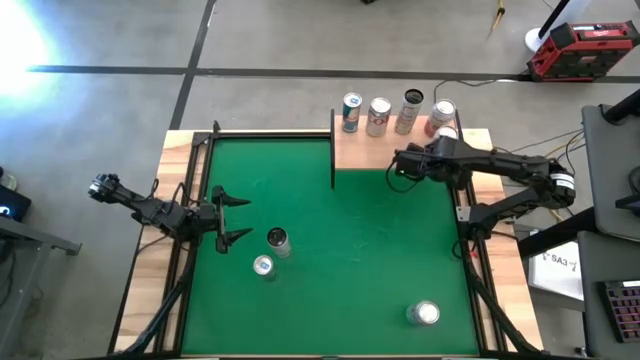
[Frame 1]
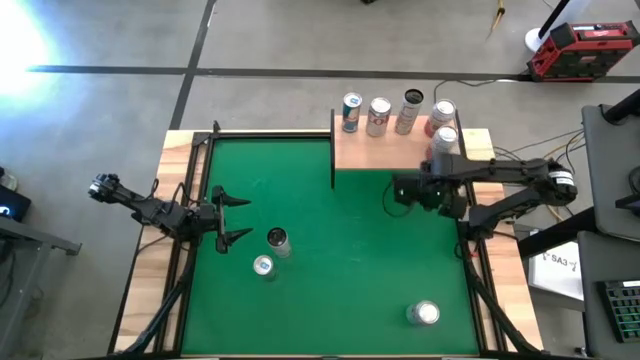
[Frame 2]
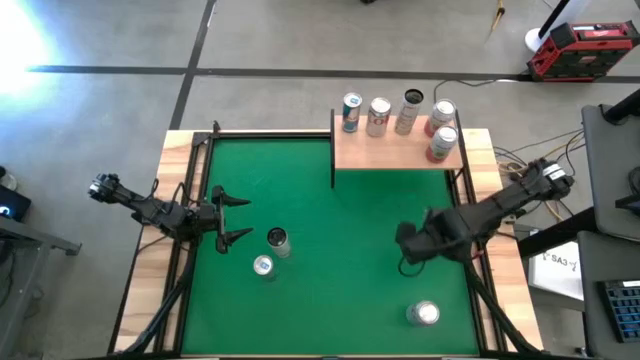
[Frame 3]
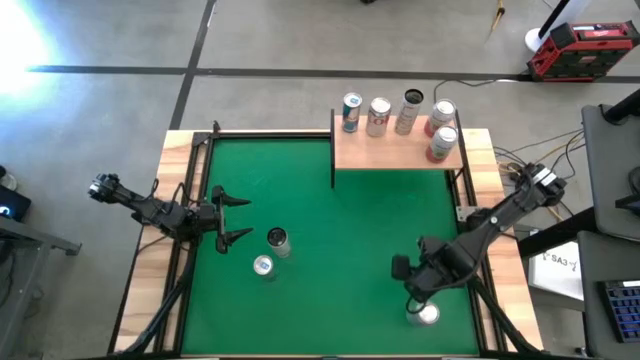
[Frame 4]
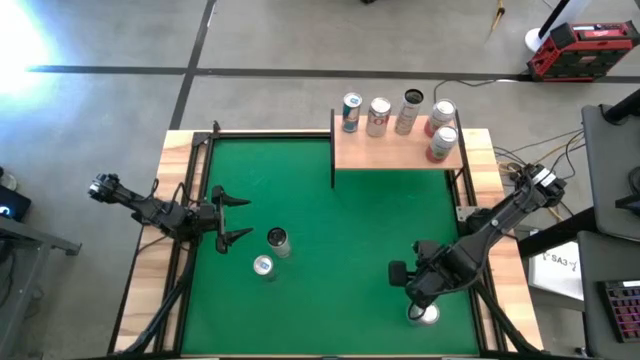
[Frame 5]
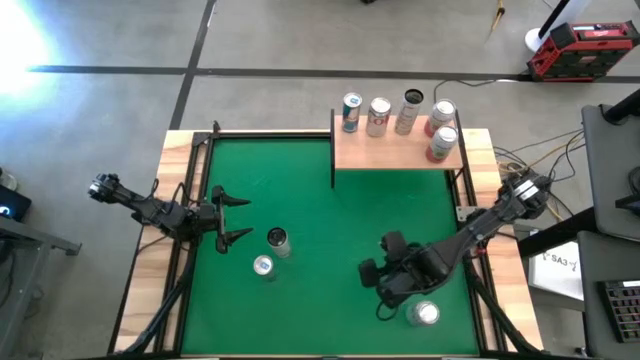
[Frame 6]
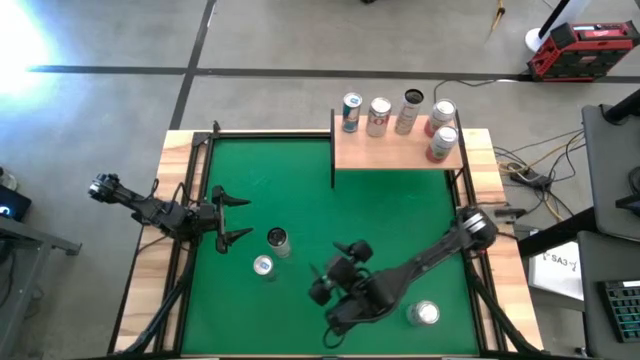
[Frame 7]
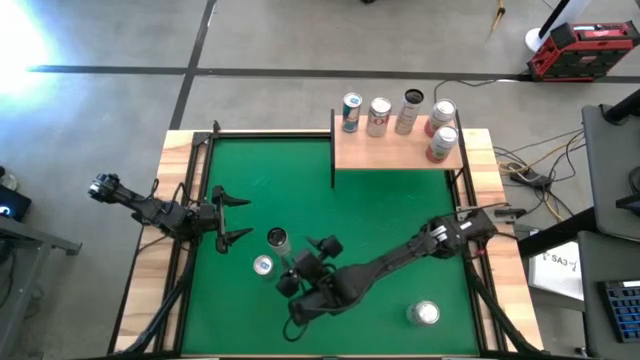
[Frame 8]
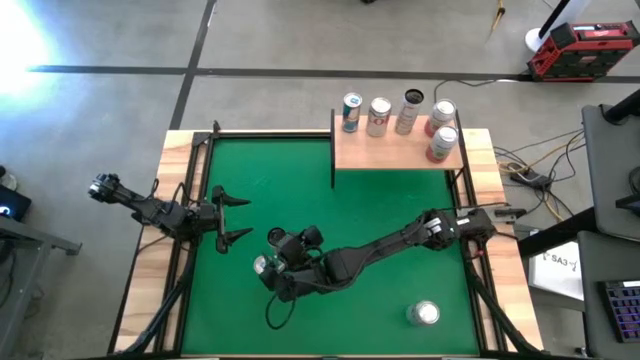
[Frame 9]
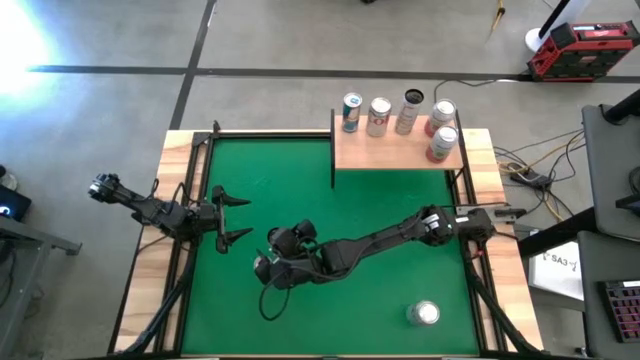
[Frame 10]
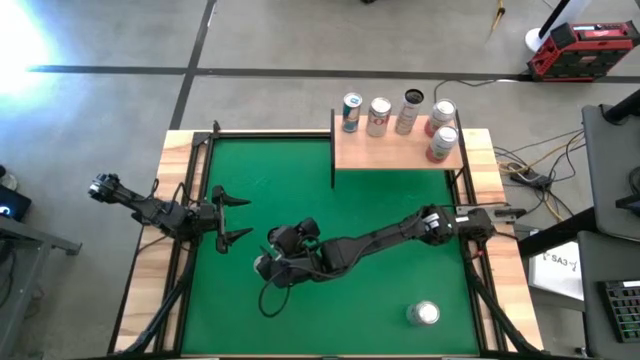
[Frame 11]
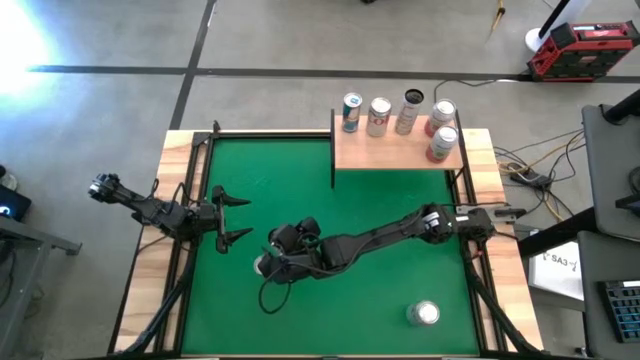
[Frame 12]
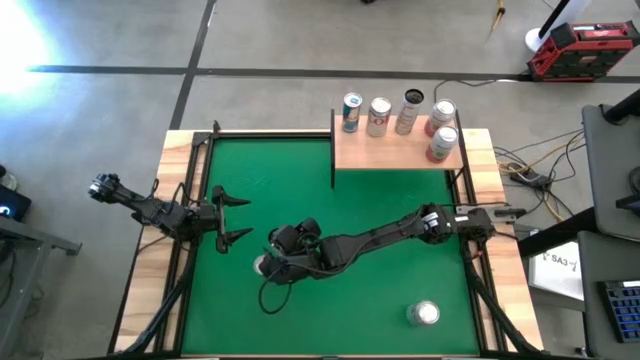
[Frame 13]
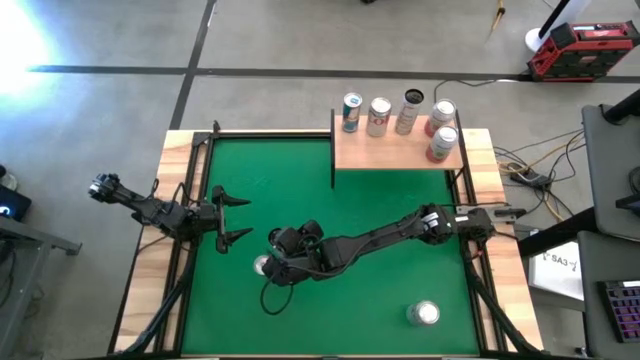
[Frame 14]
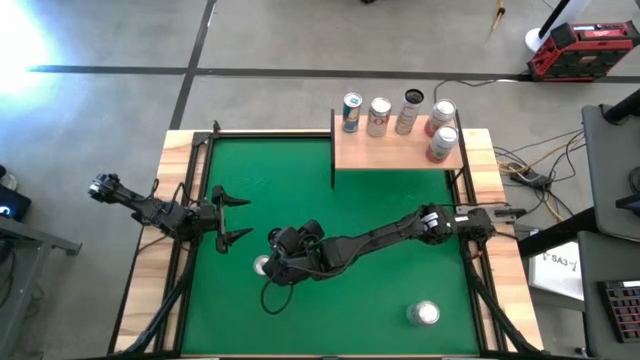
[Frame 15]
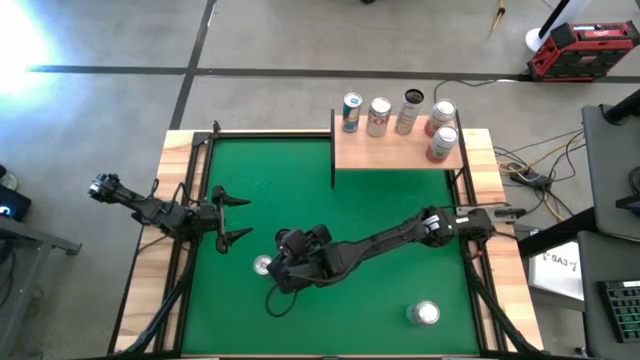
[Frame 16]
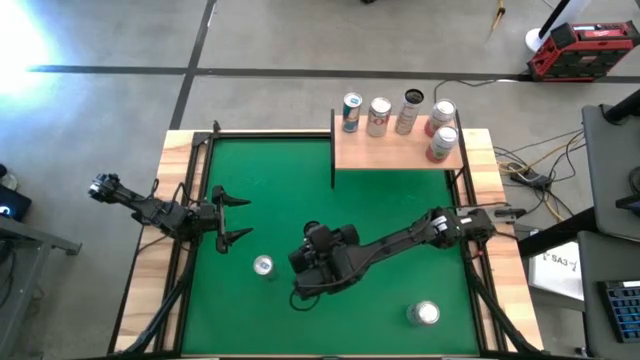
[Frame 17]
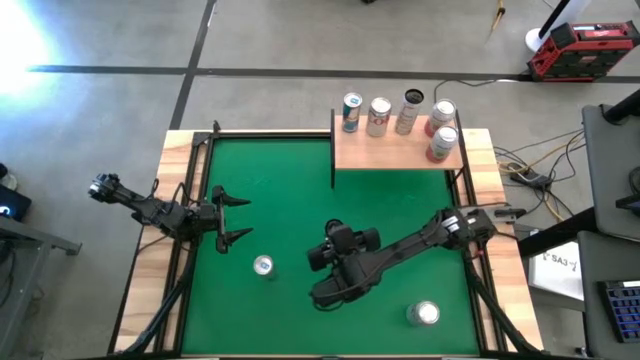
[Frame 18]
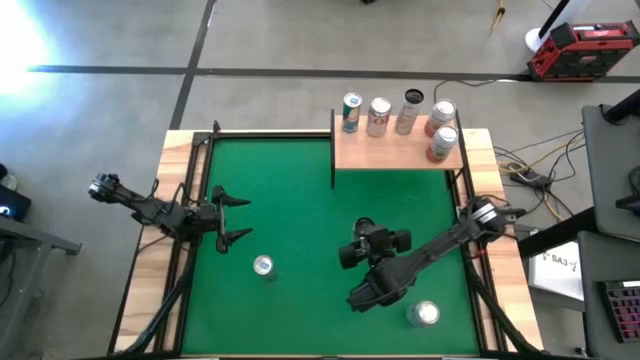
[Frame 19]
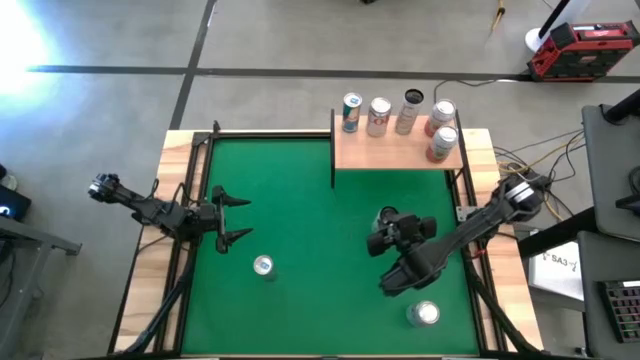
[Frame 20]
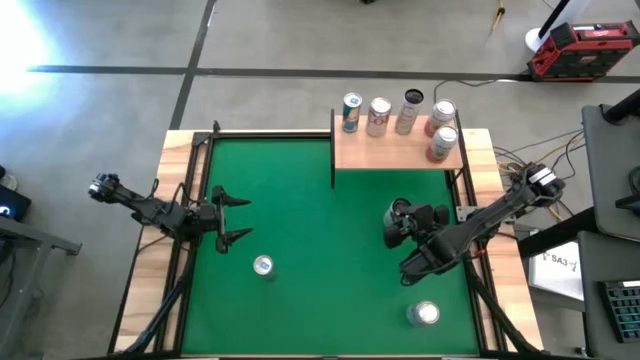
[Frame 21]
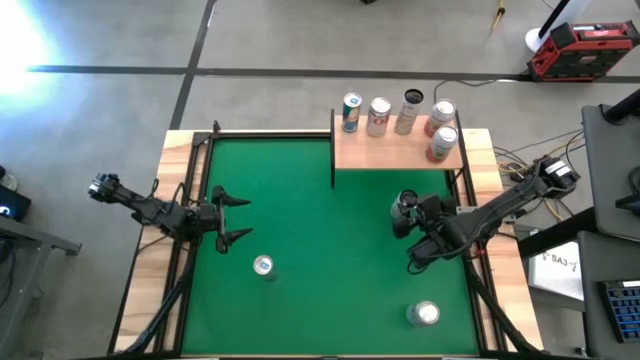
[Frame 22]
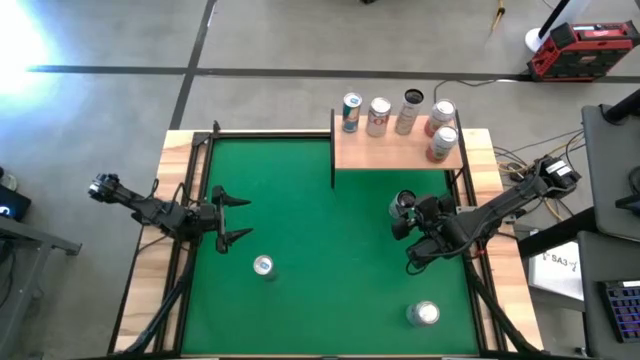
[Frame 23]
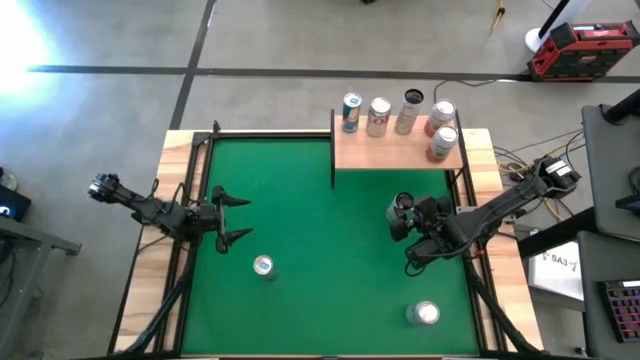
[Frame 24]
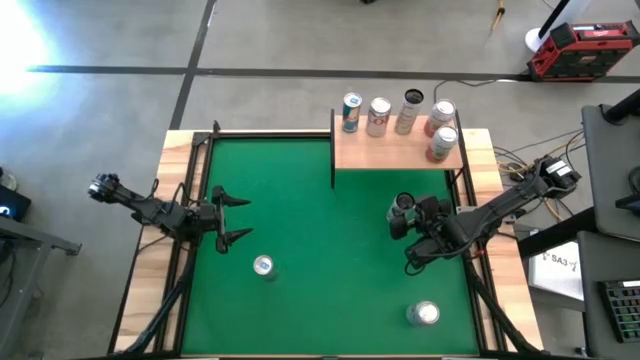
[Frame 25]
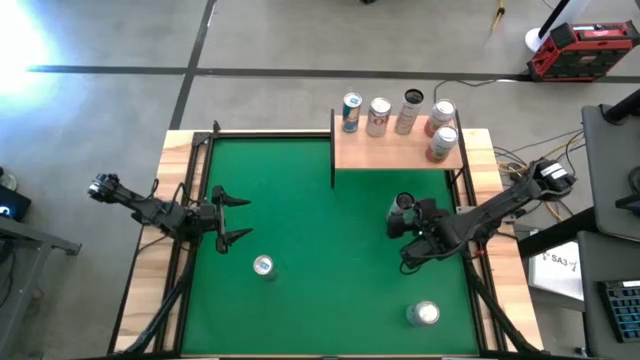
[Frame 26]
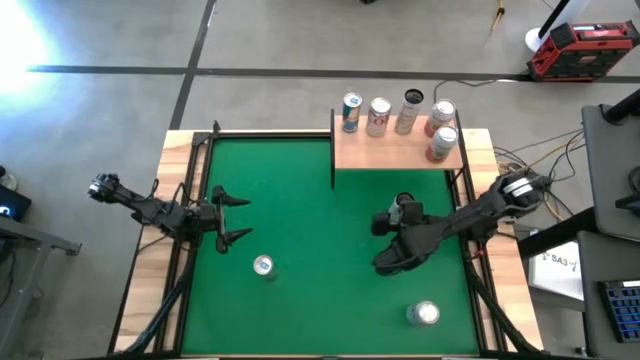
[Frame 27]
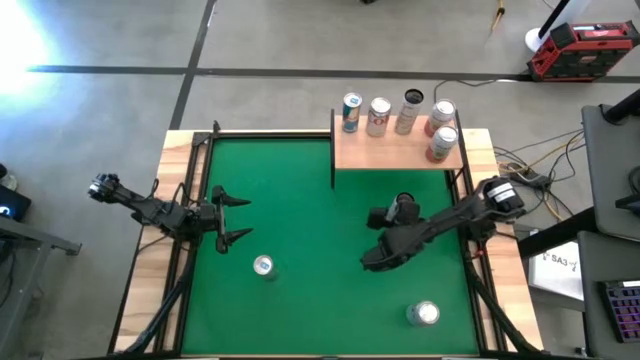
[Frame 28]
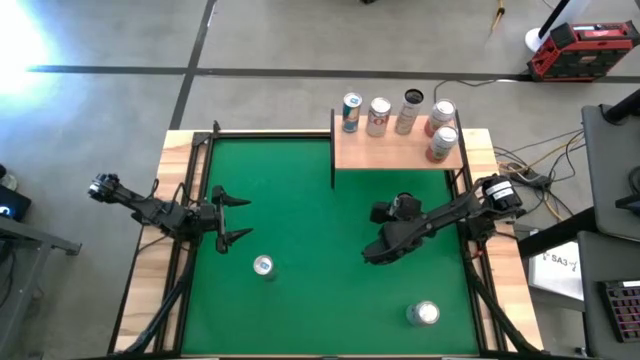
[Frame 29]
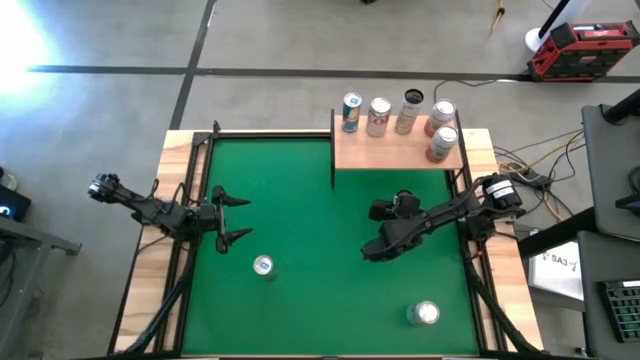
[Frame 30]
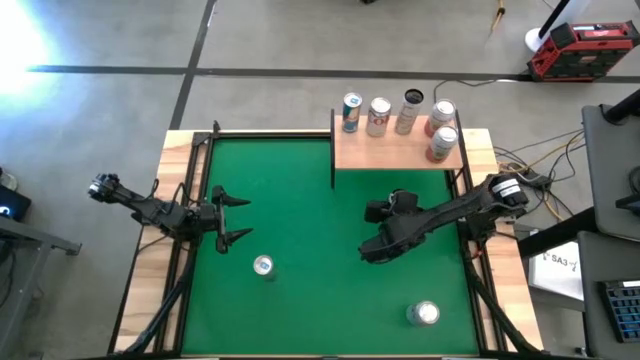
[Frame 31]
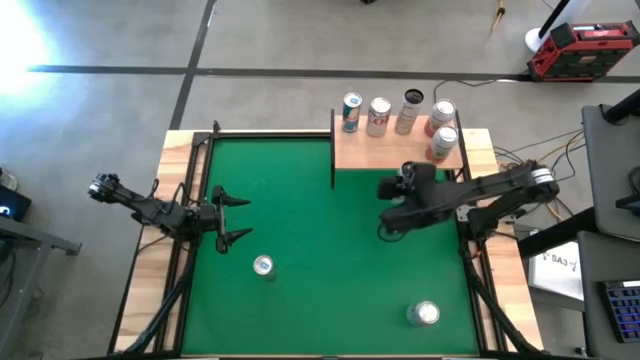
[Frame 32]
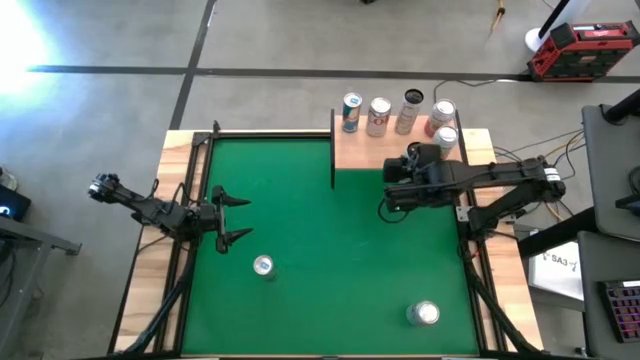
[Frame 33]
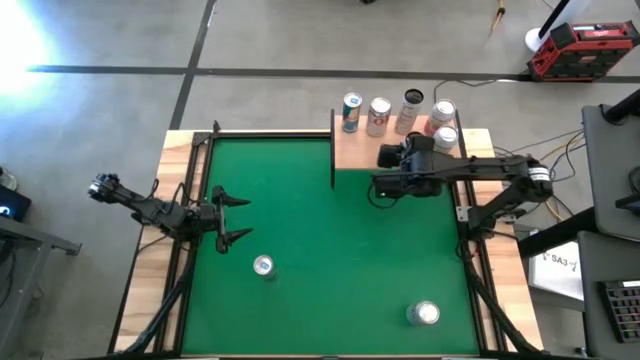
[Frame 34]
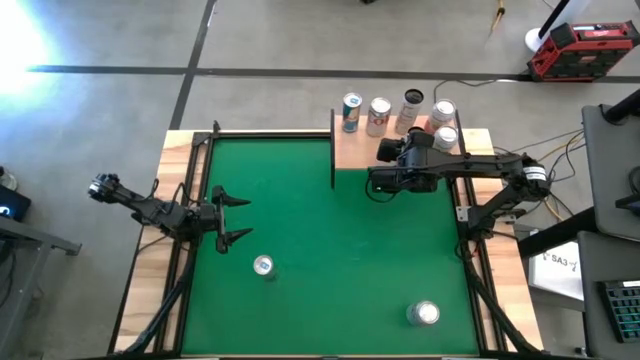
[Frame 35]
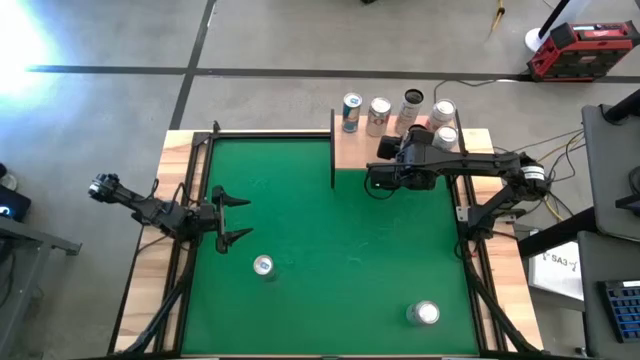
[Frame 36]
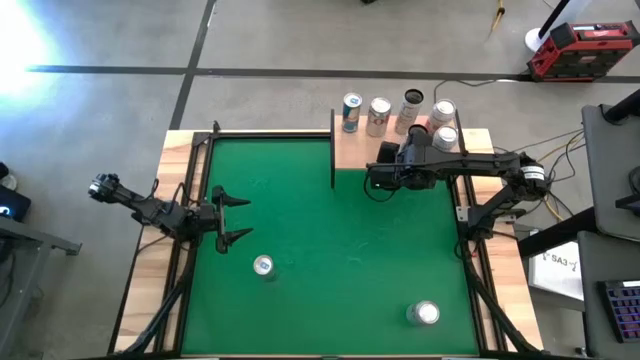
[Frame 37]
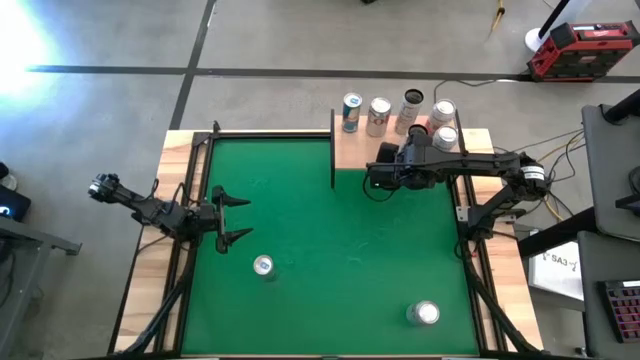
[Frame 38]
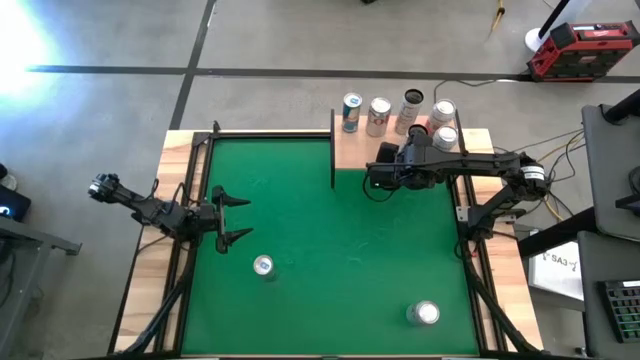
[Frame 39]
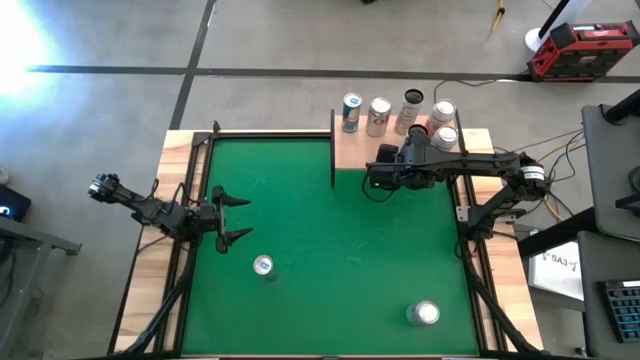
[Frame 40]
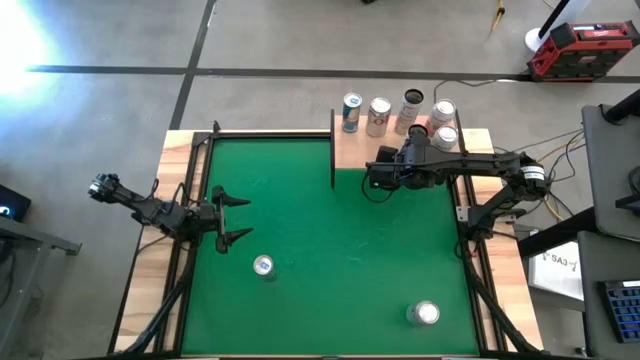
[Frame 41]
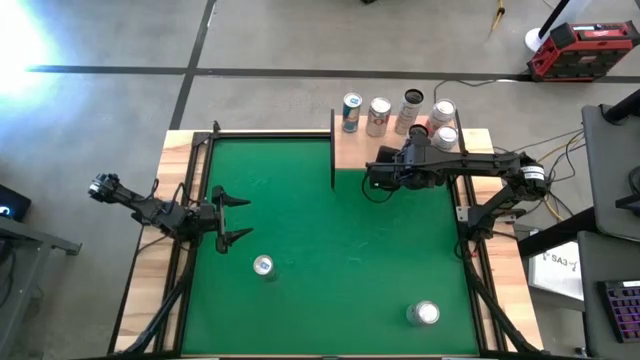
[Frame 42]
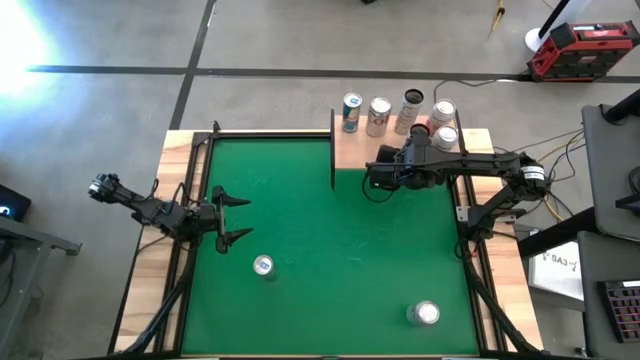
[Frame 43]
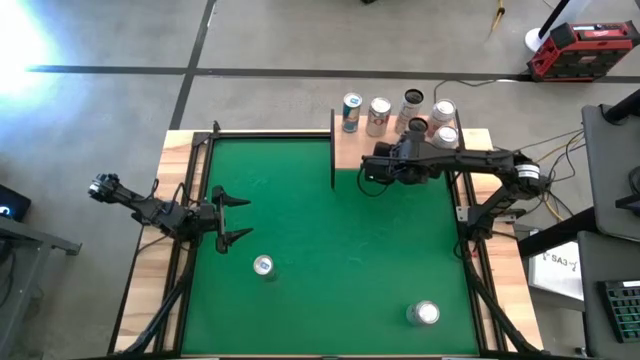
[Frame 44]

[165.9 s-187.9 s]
Task: Place canned beverage on shelf
Put the white-yellow soda can on the shelf aligned with the other white-yellow soda can
